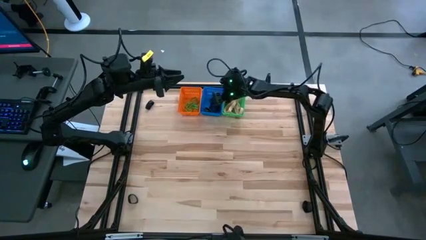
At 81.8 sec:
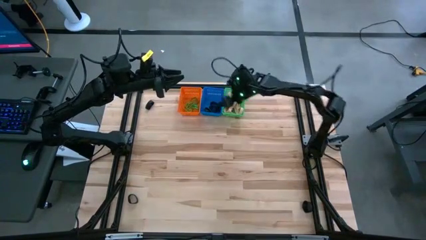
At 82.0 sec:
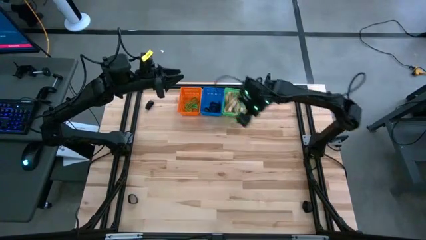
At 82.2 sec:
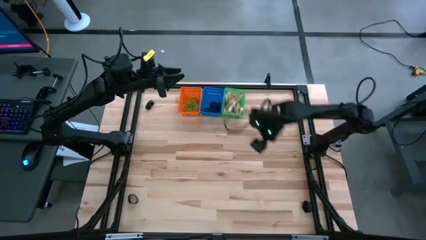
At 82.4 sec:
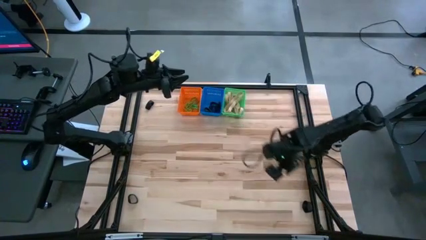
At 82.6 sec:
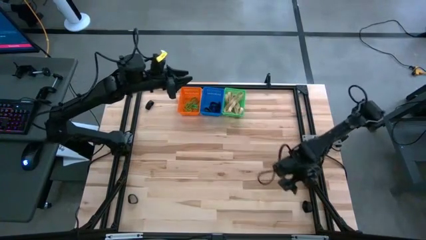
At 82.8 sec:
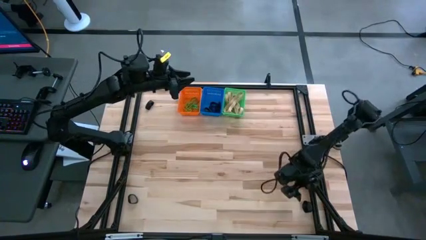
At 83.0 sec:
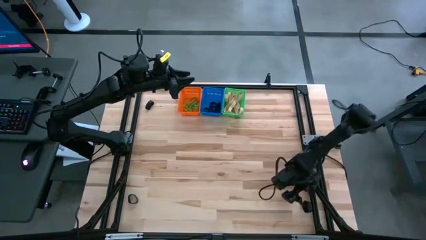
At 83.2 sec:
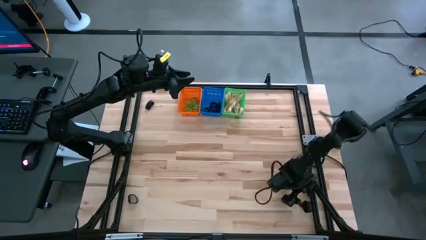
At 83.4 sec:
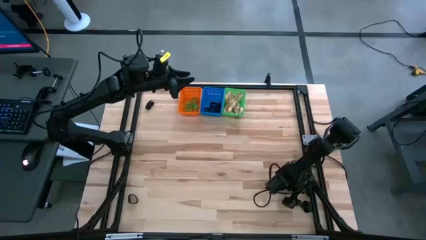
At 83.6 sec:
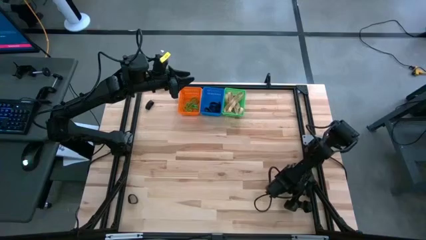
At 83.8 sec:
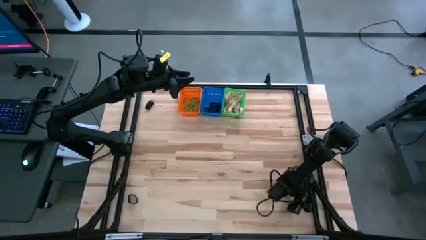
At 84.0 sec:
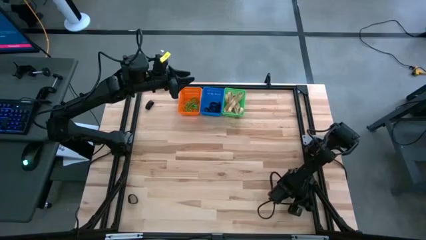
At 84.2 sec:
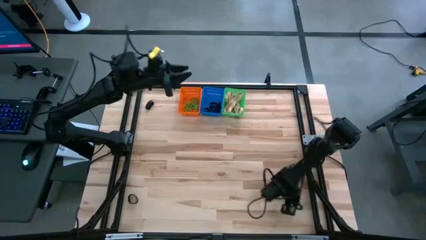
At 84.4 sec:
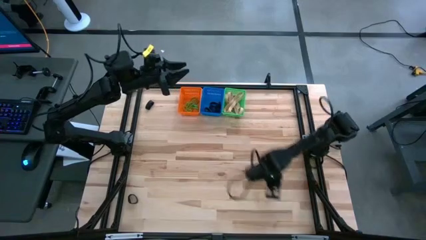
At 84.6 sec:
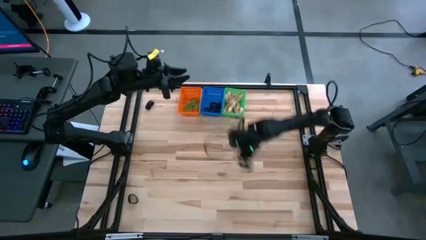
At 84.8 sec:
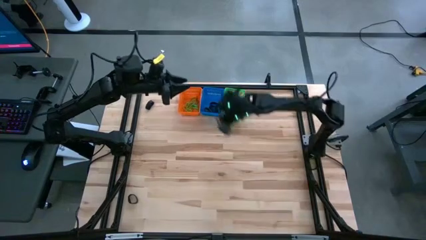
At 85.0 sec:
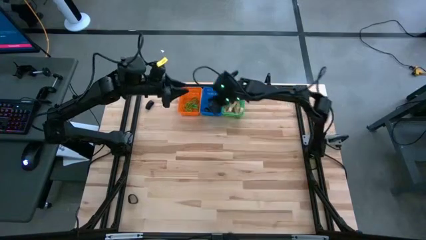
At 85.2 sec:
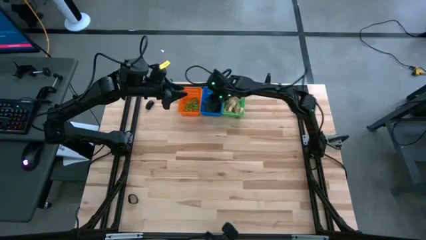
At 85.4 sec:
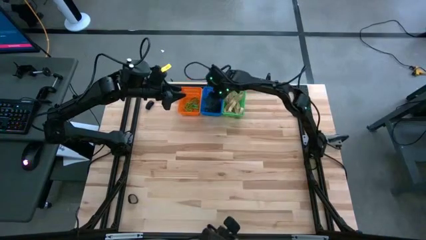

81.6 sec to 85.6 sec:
Task: Sort rubber bands into baskets
Put the black rubber band into the blue bin

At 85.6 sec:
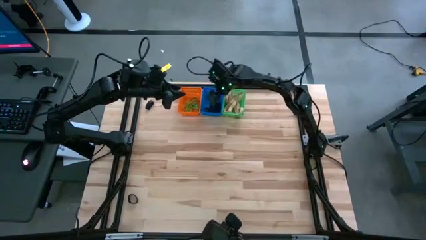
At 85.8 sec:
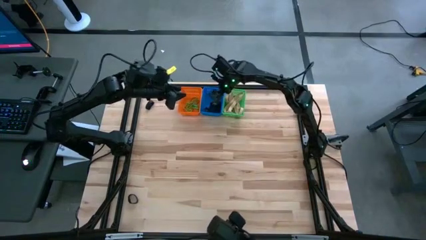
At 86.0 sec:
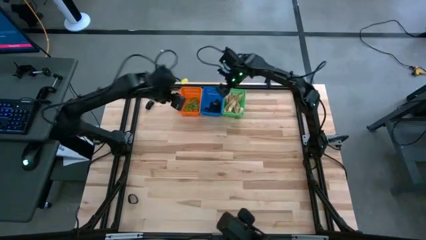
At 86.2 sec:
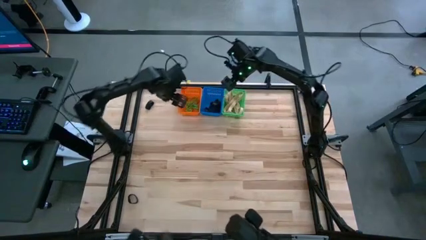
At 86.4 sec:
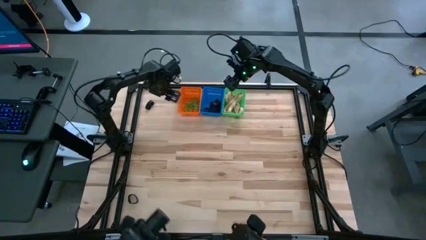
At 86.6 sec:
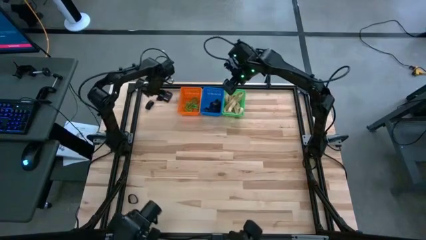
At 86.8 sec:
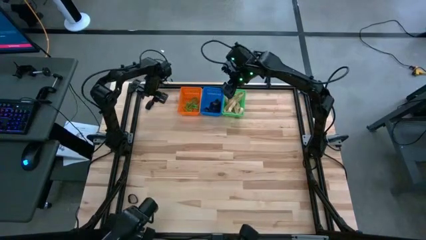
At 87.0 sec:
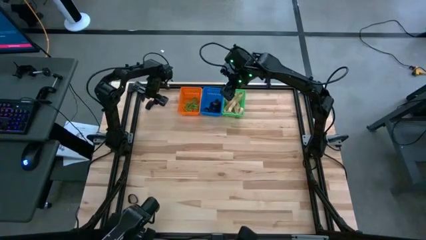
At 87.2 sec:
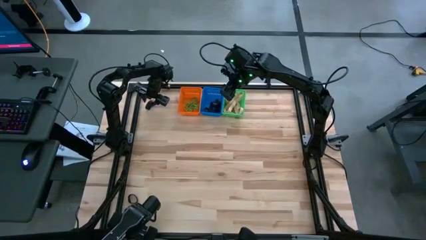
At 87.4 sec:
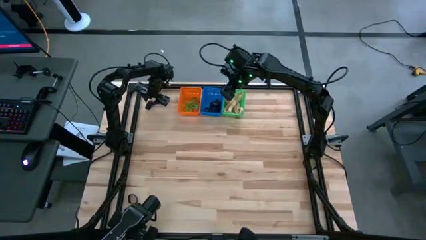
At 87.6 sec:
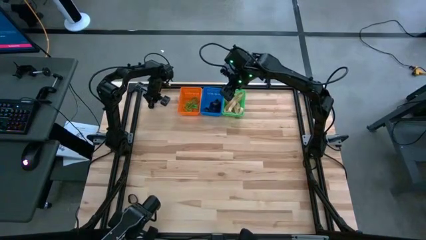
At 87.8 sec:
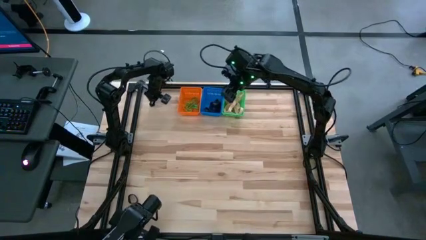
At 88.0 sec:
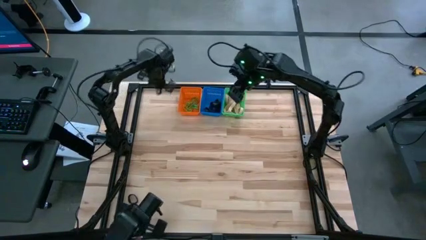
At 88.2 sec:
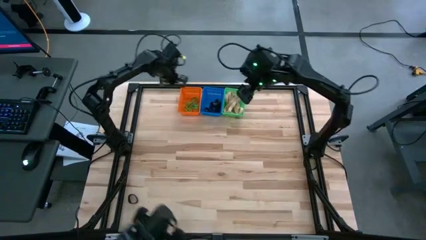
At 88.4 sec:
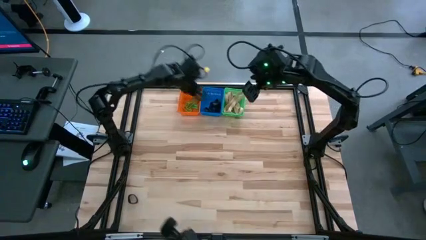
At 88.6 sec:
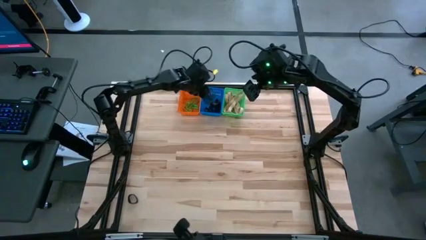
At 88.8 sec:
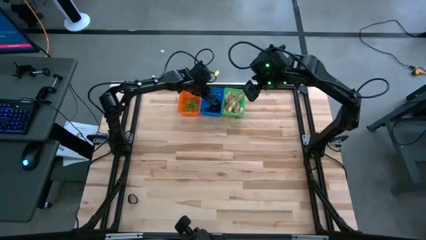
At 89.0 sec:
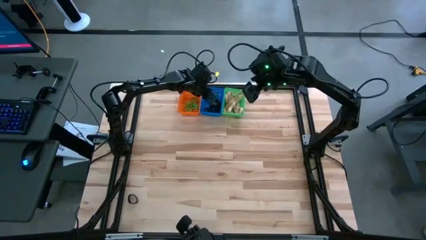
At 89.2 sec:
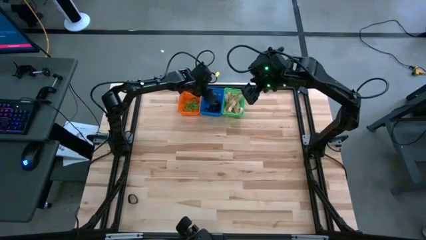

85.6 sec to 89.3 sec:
Put the black rubber band into the blue bin

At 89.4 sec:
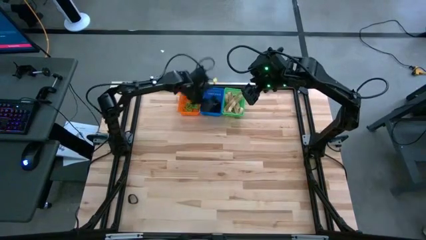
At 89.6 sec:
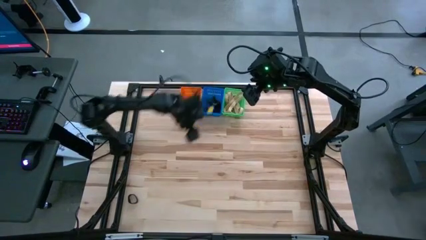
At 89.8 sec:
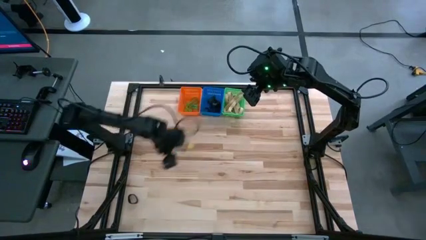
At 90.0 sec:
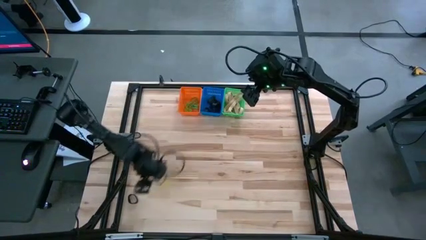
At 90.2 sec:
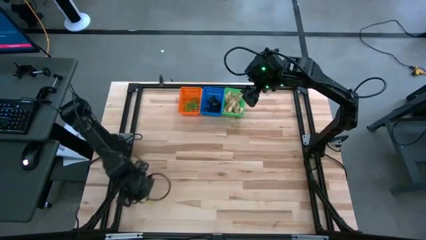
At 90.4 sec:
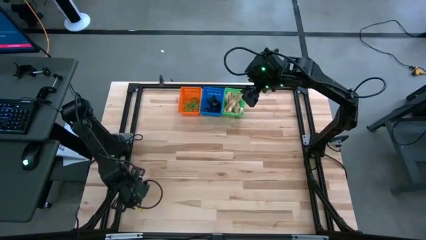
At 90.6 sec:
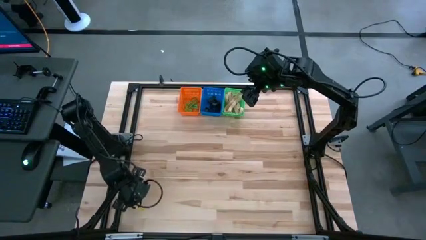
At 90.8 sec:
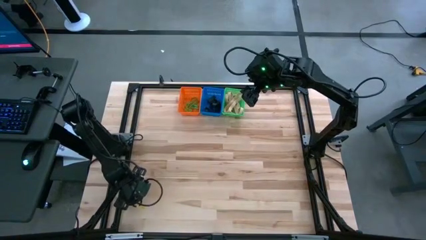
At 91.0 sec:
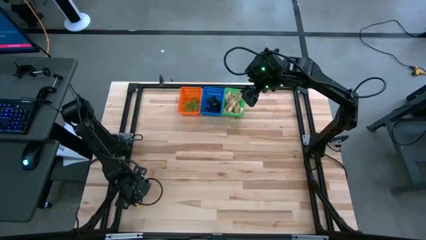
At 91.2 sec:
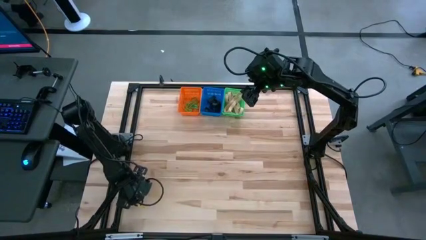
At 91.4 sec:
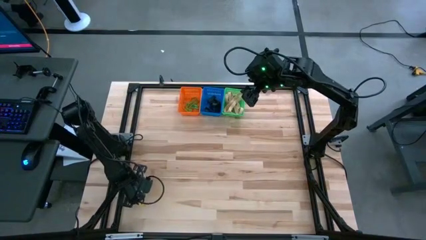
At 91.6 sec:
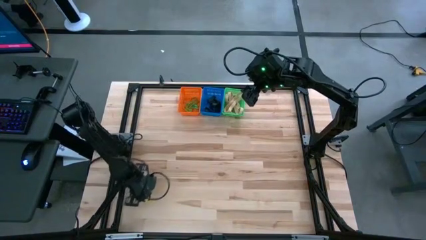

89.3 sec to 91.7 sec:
Put the black rubber band into the blue bin

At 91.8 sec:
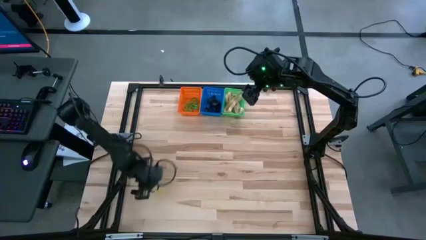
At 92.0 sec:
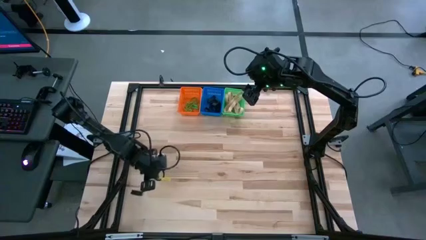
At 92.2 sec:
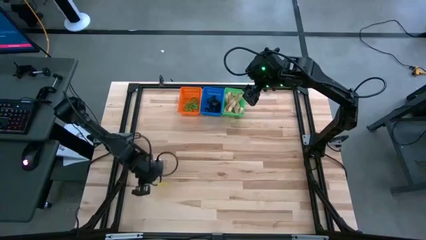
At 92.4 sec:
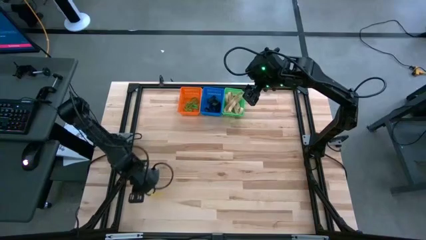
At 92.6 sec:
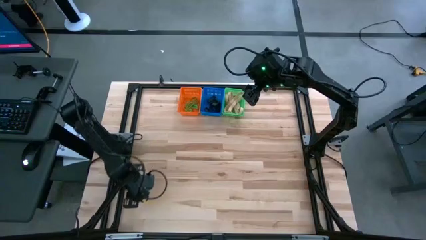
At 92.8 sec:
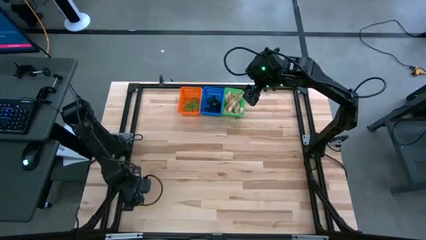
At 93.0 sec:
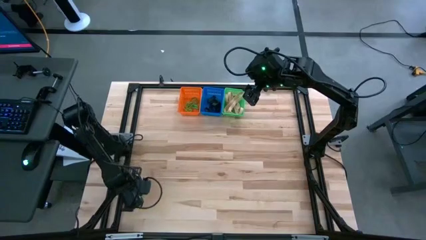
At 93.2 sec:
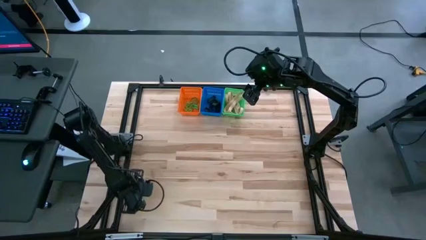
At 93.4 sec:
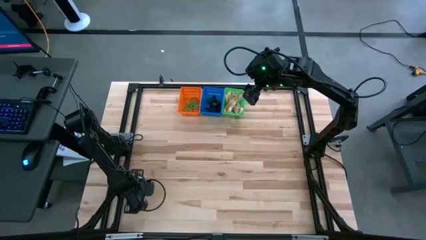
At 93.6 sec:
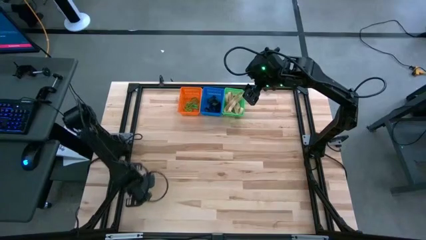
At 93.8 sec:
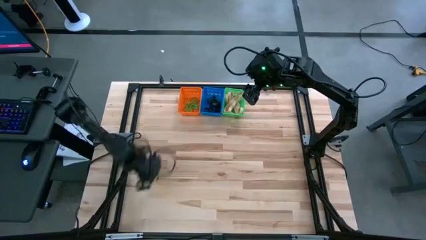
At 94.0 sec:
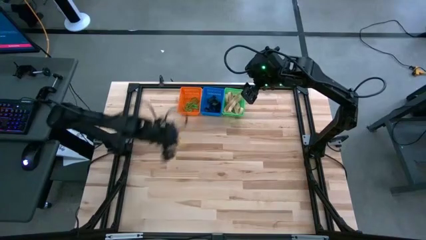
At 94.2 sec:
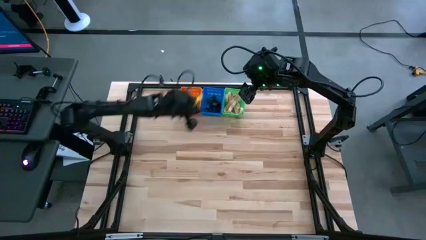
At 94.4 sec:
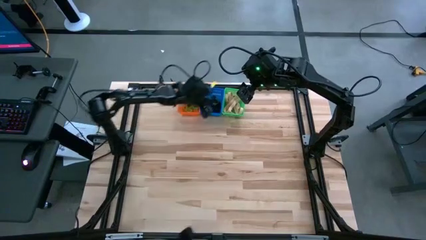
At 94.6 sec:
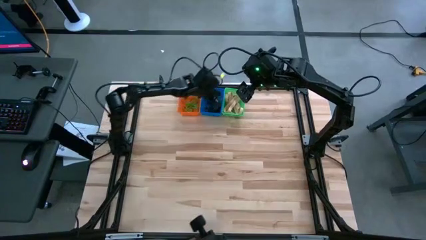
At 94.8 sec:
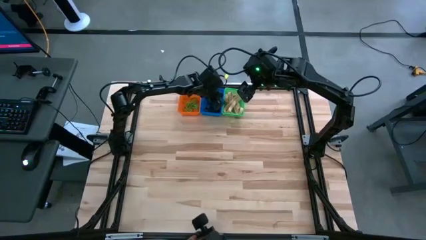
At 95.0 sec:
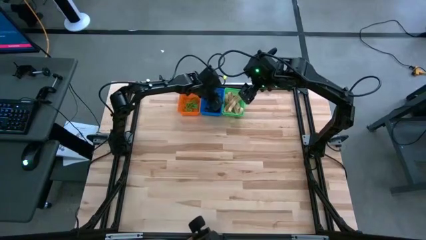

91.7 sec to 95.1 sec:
Put the black rubber band into the blue bin

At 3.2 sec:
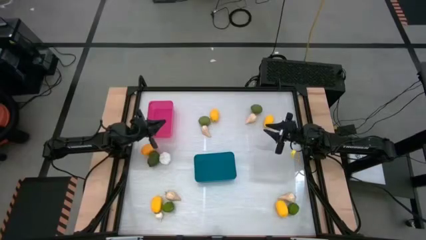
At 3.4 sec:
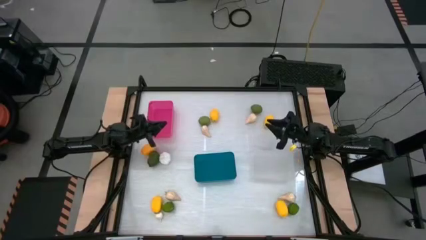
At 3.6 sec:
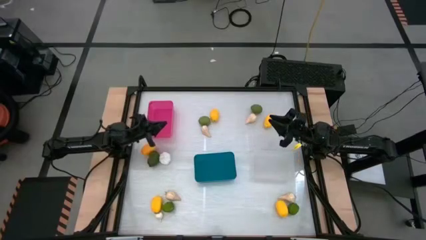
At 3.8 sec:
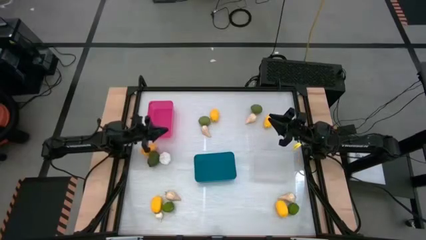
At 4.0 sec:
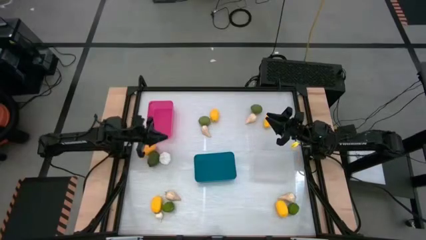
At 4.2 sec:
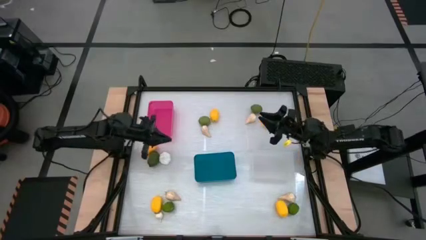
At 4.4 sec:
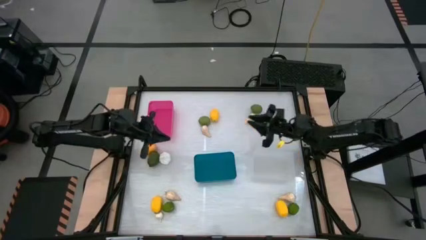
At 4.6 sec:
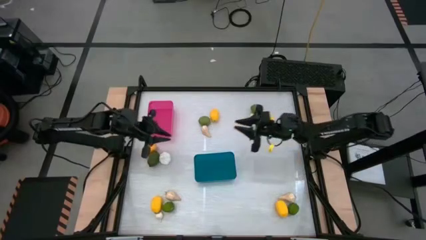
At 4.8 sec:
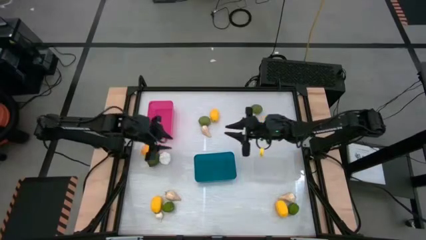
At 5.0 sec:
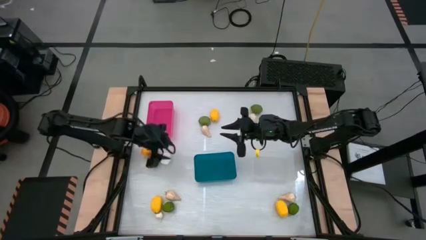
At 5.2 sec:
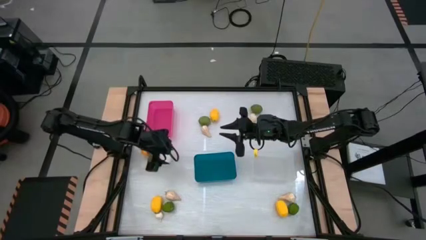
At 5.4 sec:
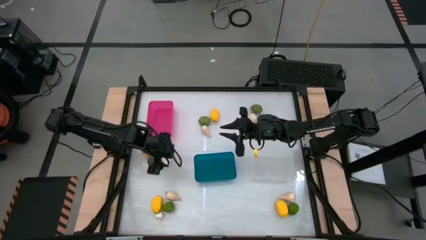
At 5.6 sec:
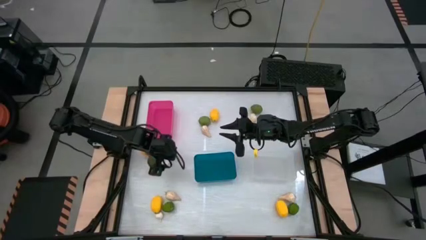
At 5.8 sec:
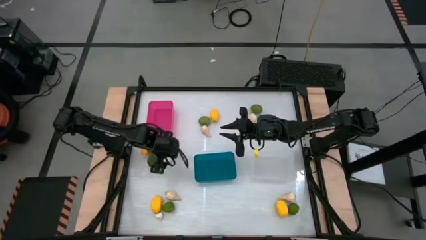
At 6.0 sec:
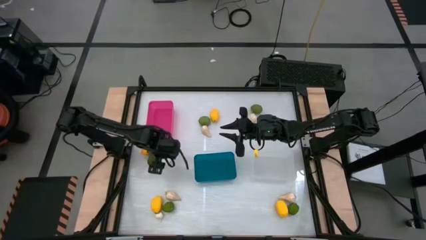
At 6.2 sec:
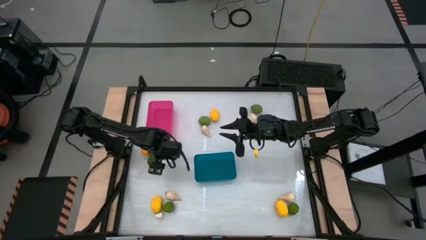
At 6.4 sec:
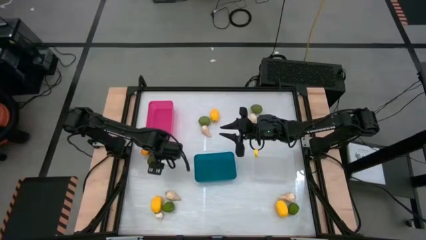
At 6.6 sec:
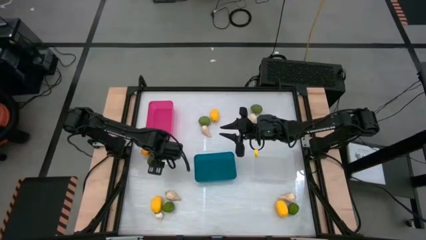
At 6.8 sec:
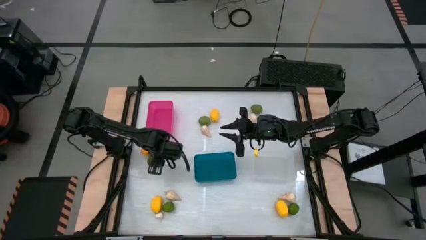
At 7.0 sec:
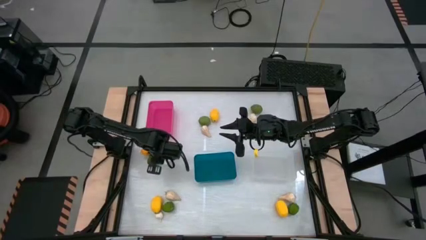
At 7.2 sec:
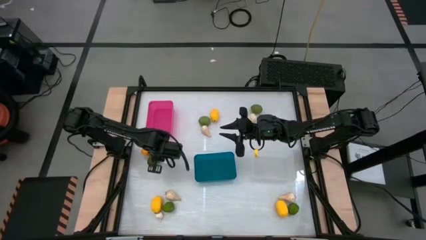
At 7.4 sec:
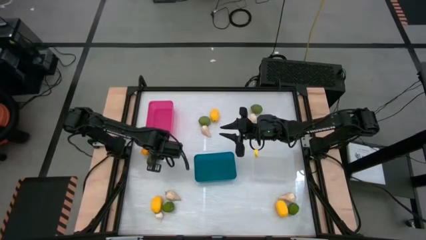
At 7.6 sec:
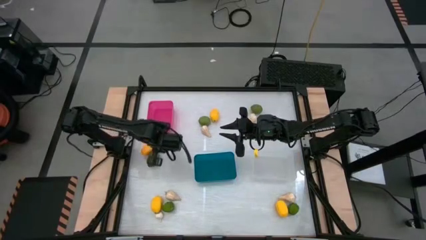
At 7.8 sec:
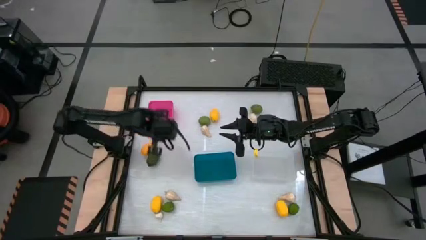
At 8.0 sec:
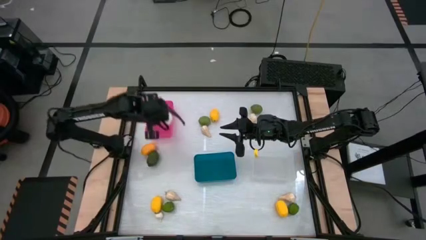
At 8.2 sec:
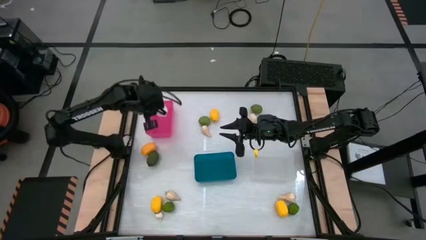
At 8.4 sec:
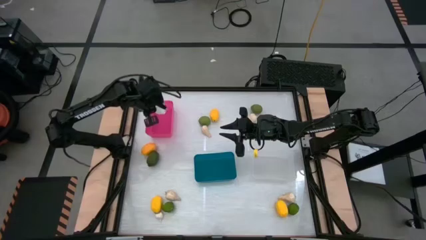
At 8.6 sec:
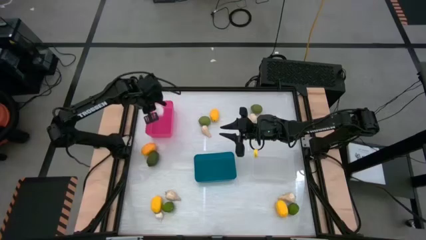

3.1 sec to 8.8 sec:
Task: Sort produce into baskets
Put the garlic into the pink bin
